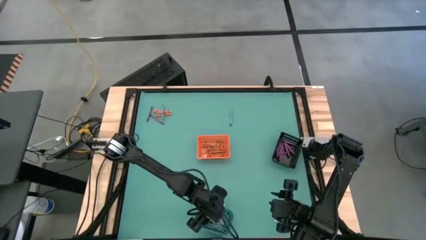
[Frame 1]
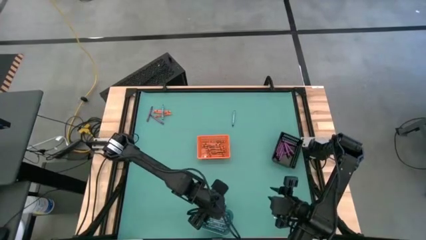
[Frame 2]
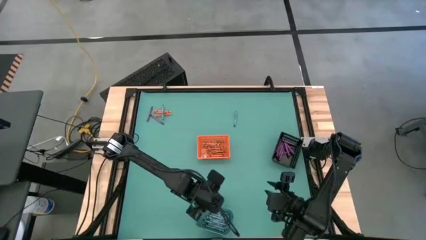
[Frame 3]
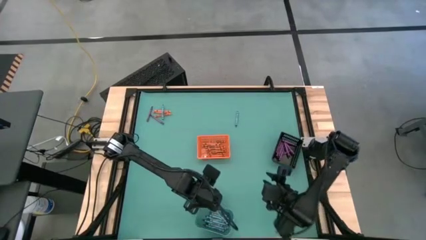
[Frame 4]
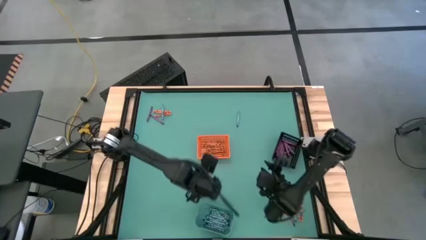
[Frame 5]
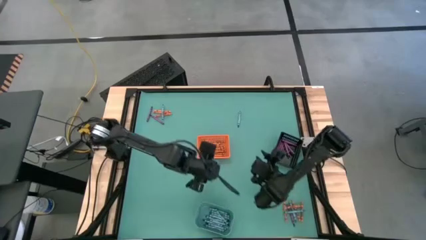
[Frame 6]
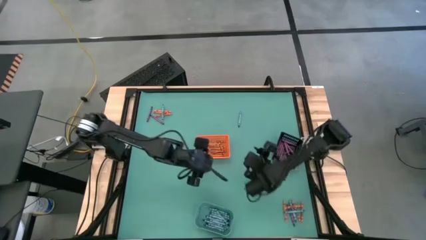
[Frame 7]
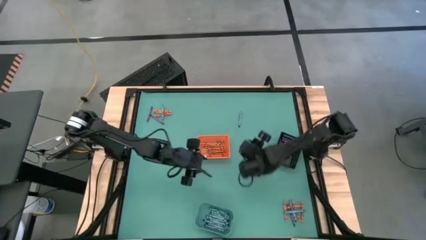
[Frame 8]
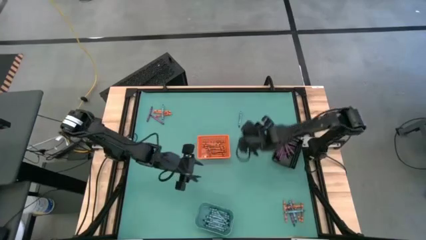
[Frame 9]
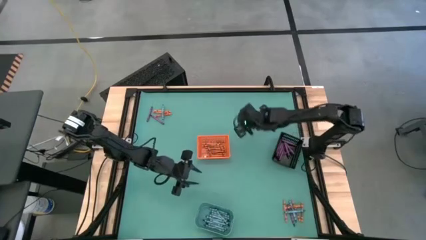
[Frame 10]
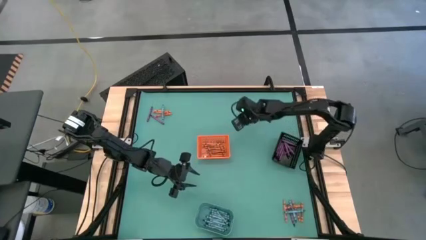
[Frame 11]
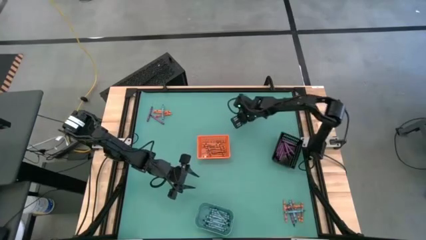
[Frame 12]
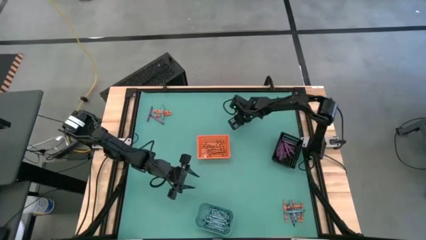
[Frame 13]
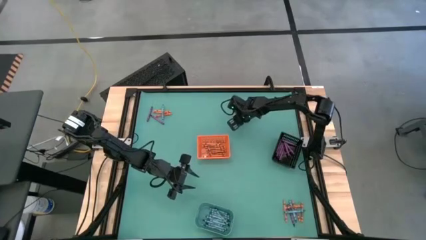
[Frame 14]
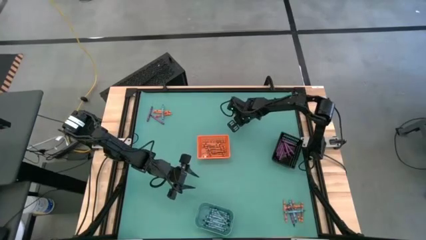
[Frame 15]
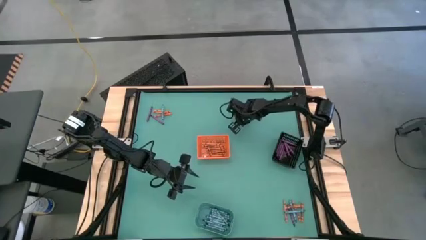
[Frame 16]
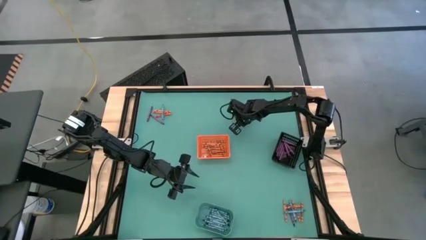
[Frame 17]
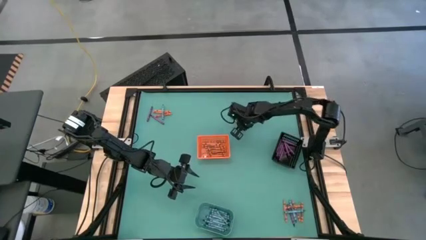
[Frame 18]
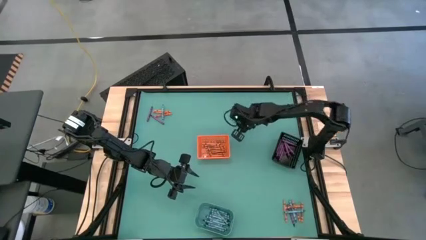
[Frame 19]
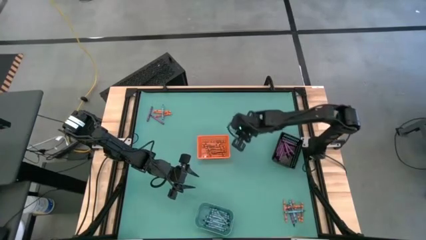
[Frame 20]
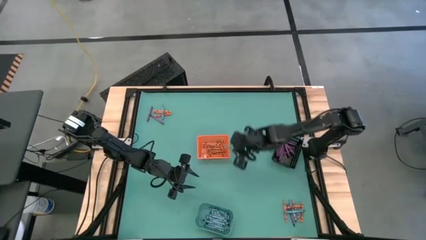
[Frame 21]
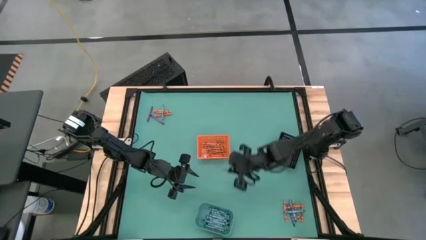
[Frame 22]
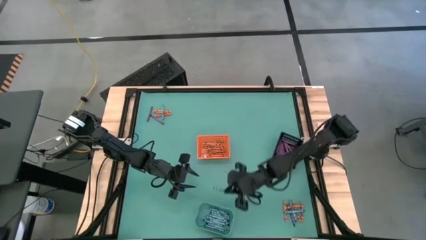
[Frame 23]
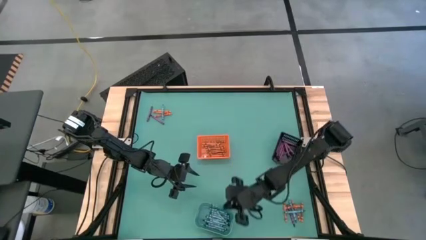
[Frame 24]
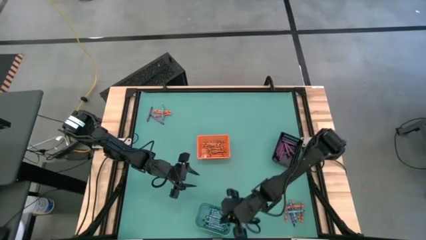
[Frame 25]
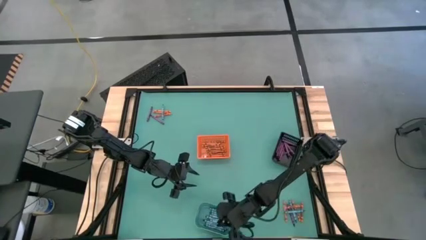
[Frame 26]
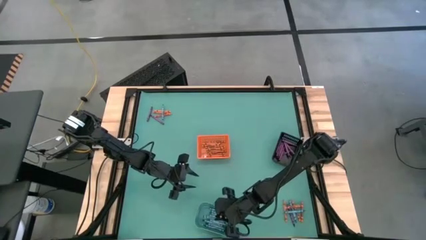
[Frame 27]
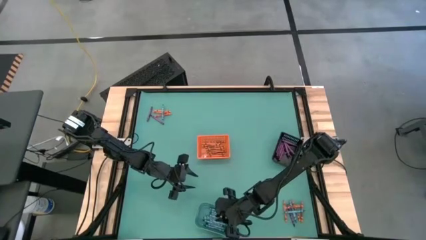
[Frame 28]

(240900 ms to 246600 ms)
Task: Sort crayons
Put the blue crayon into the blue bin

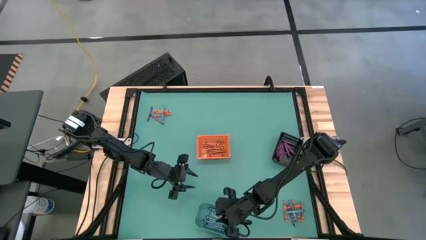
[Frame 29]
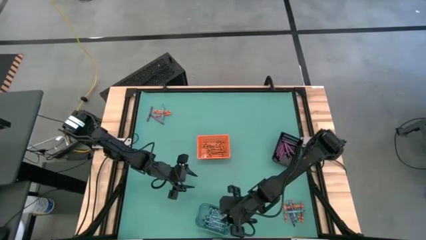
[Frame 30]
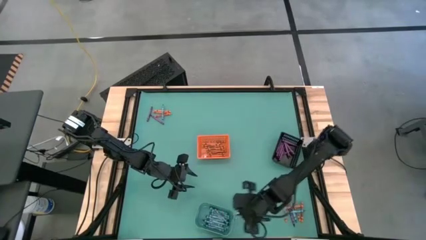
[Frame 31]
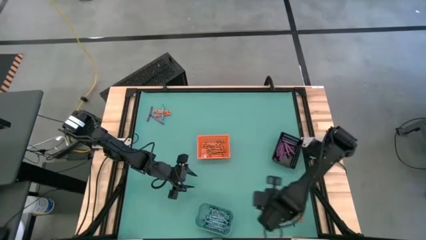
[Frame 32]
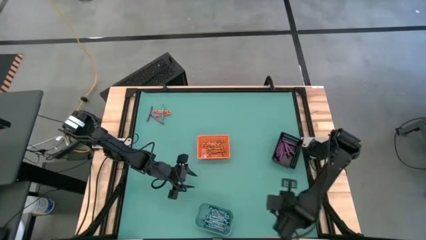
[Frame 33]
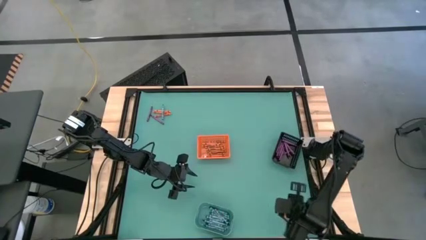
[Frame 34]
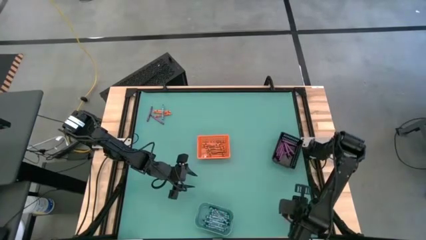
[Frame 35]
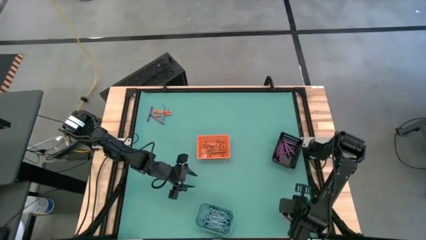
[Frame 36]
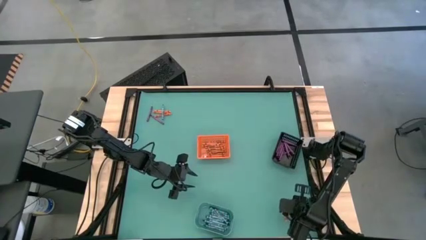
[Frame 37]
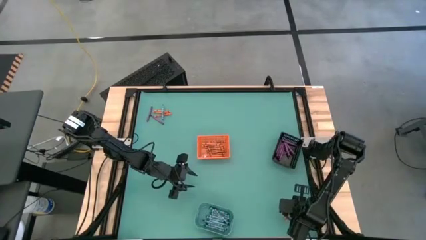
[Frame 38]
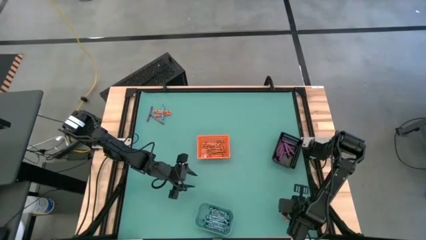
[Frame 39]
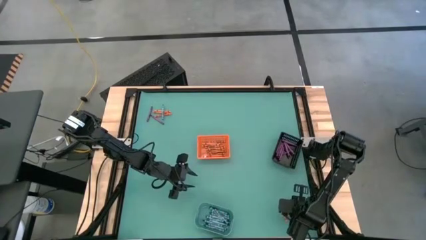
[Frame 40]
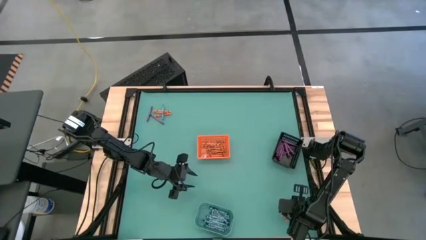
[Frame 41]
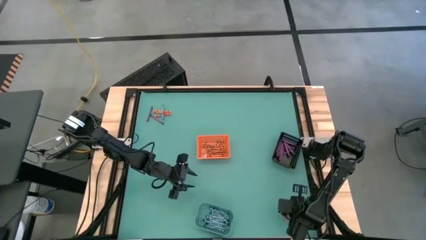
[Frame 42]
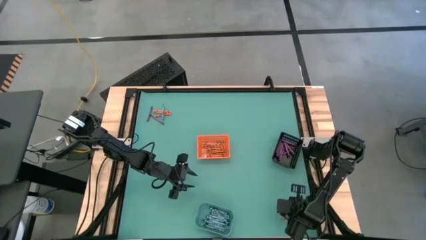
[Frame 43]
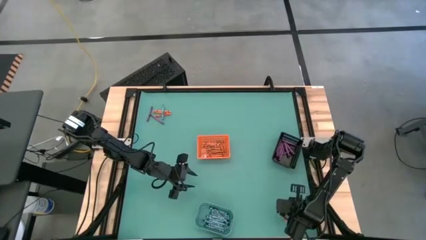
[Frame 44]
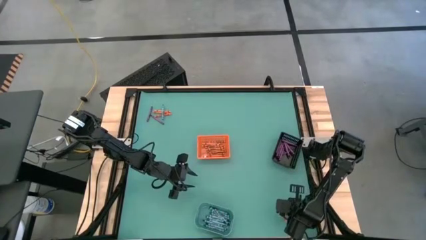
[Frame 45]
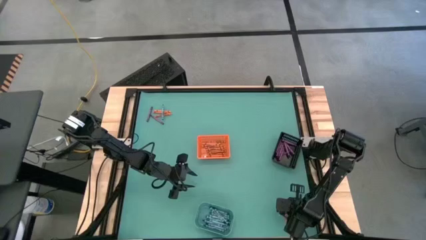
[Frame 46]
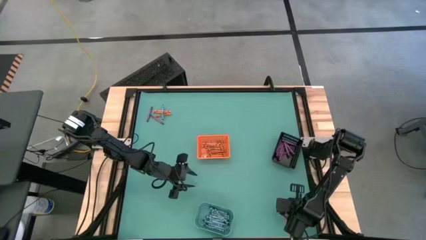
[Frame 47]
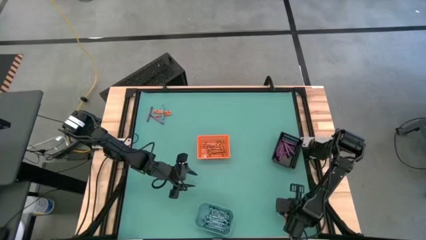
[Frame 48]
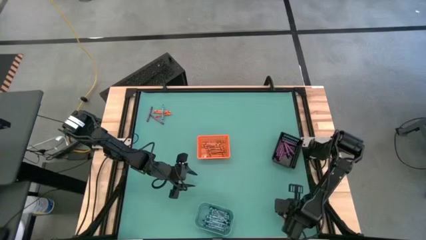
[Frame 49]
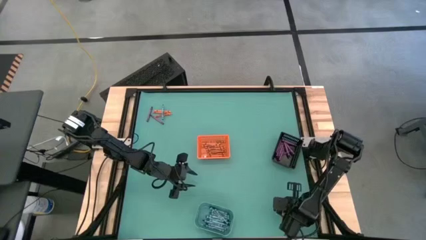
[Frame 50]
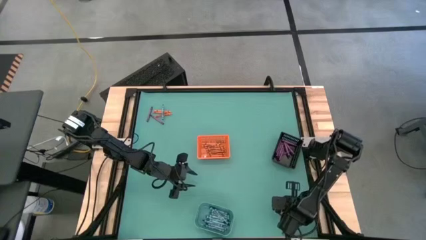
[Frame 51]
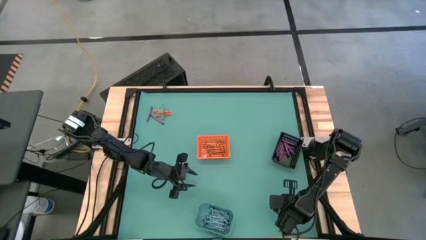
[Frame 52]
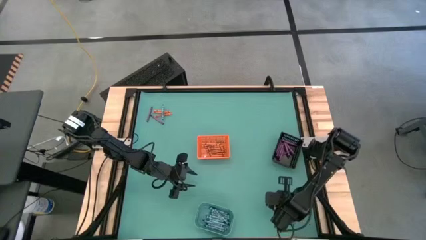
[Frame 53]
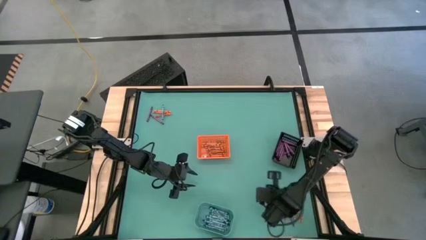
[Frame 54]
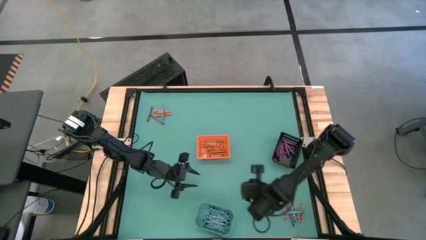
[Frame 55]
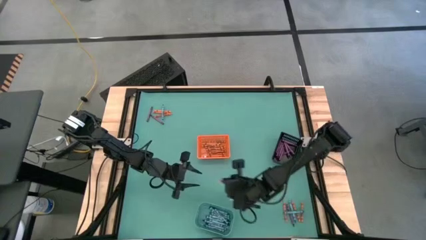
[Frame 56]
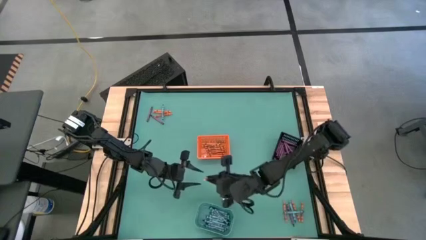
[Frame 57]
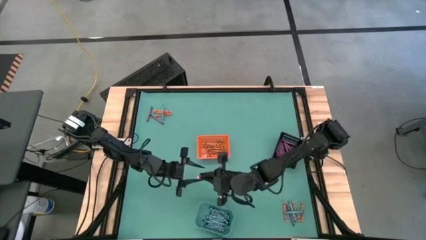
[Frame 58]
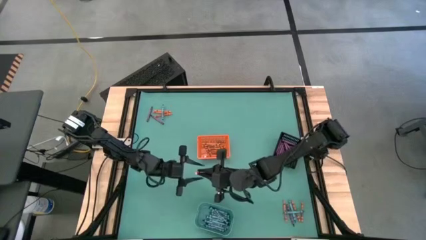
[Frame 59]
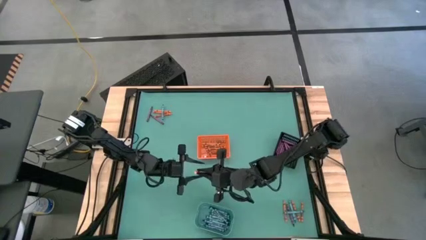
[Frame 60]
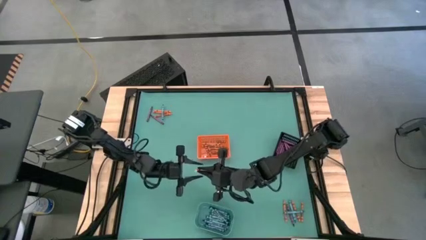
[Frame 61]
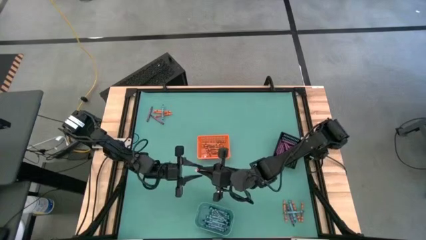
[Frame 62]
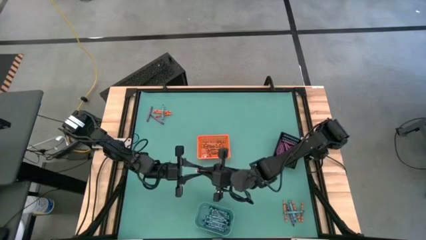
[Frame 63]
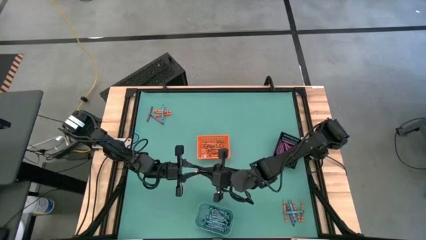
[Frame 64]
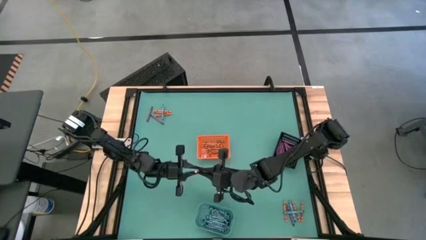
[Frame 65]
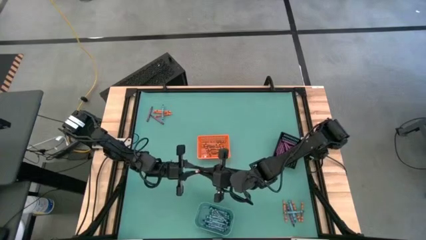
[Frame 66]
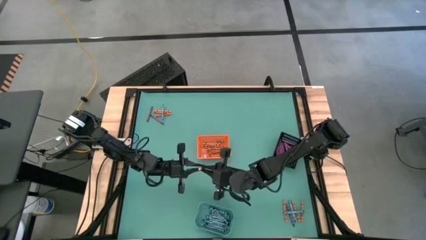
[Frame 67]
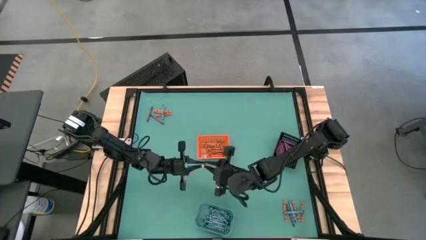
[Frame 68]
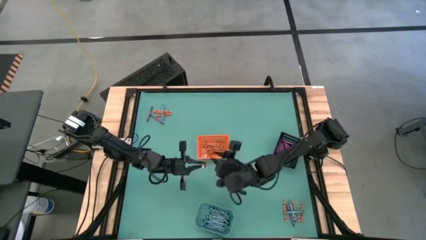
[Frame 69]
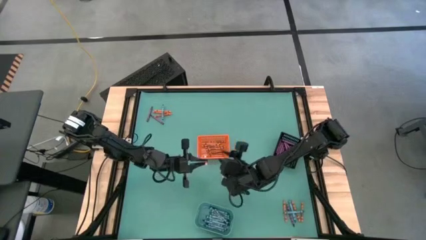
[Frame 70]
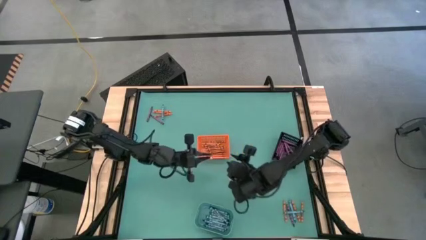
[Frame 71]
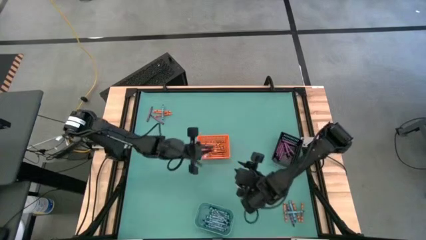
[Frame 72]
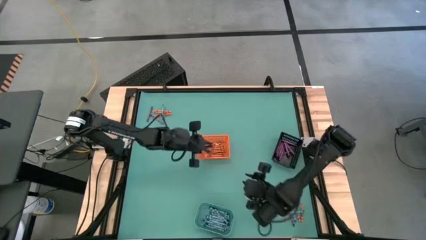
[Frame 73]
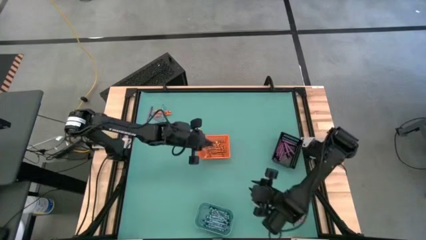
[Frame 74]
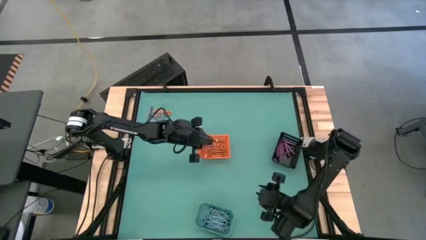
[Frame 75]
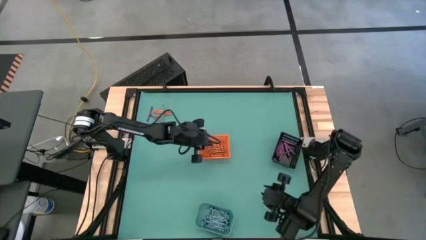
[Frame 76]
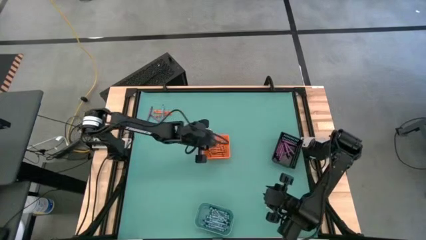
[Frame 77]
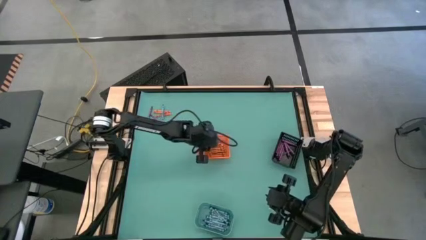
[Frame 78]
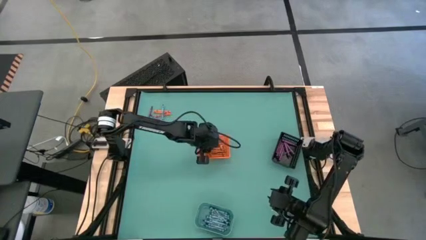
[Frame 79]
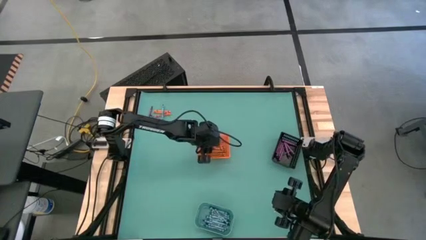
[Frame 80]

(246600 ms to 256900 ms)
Put the orange crayon into the orange basket
